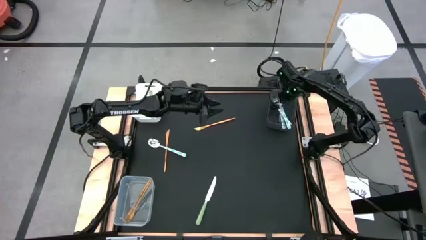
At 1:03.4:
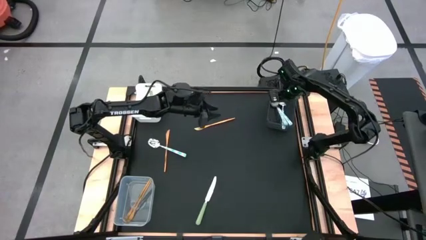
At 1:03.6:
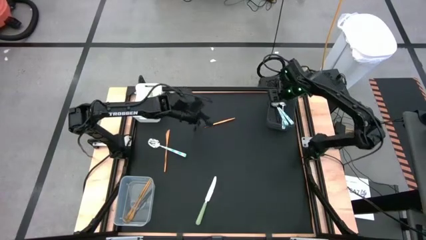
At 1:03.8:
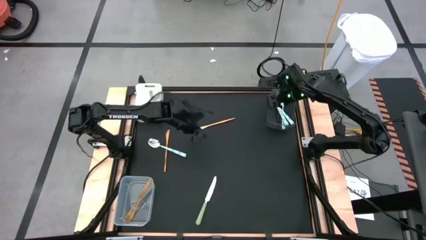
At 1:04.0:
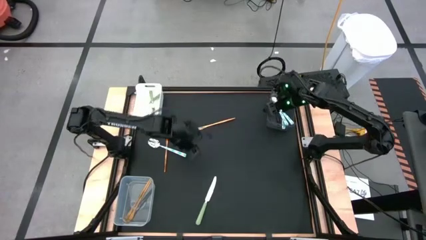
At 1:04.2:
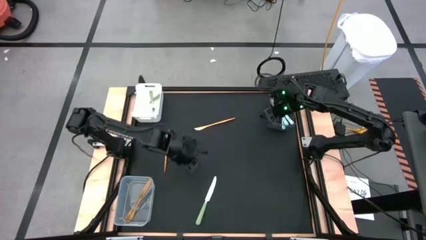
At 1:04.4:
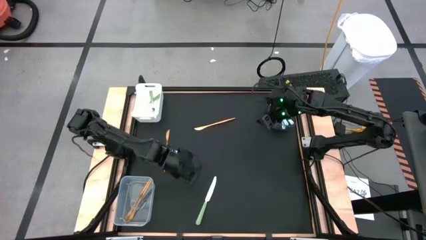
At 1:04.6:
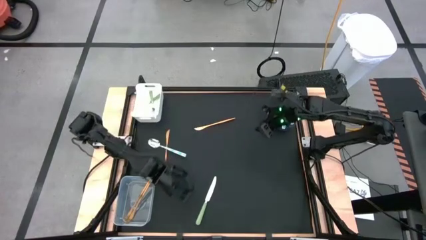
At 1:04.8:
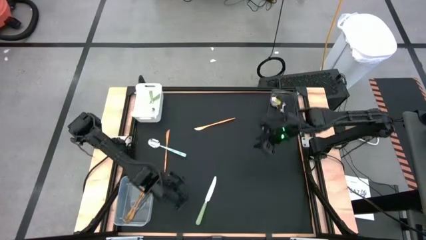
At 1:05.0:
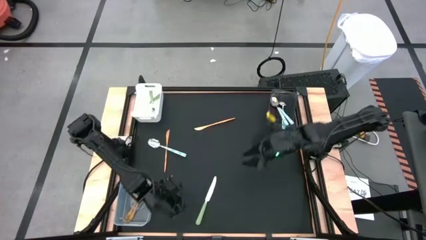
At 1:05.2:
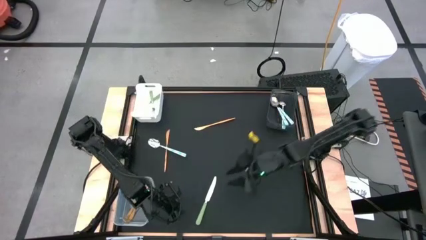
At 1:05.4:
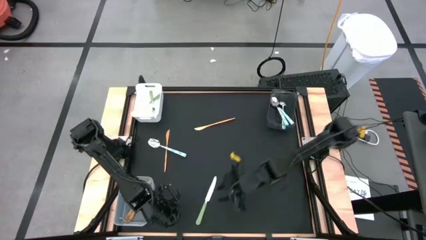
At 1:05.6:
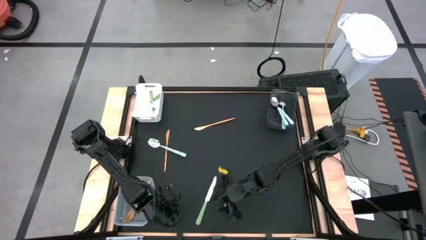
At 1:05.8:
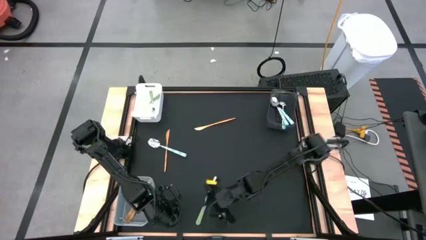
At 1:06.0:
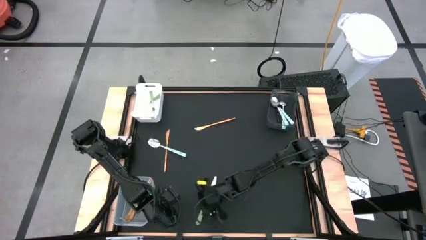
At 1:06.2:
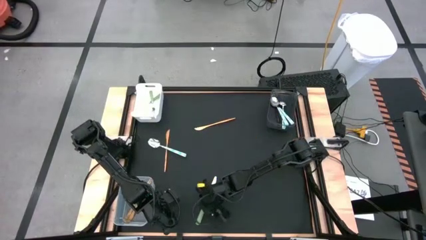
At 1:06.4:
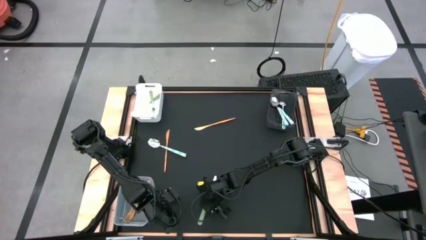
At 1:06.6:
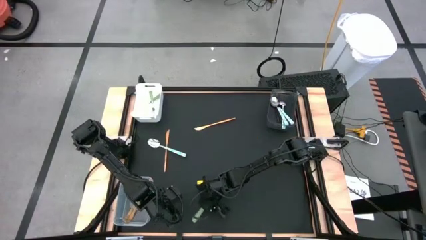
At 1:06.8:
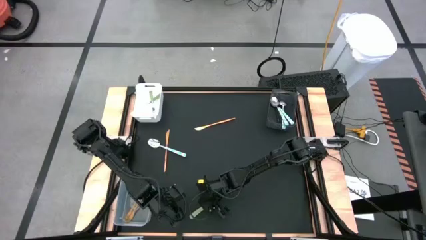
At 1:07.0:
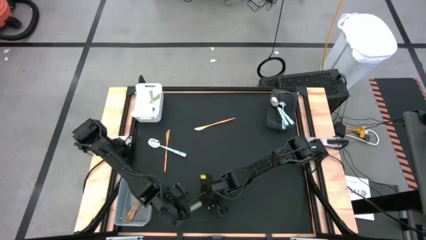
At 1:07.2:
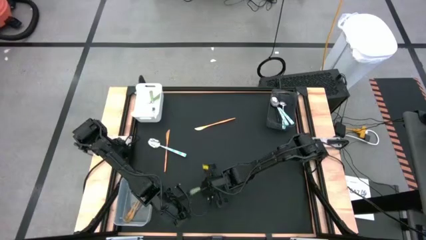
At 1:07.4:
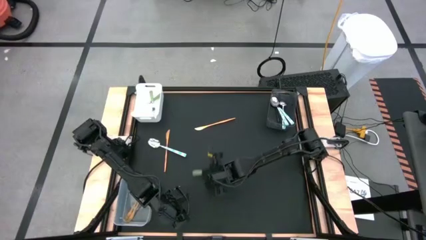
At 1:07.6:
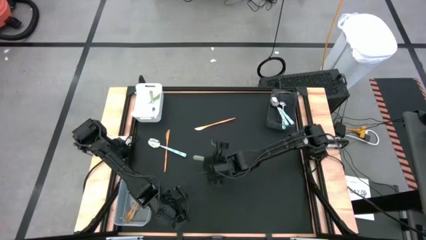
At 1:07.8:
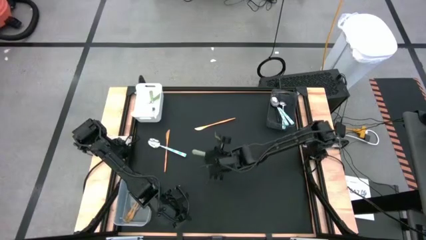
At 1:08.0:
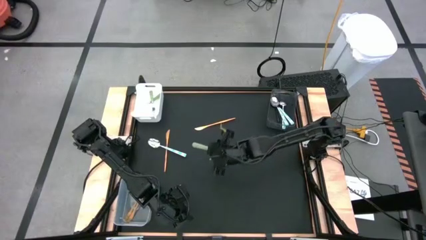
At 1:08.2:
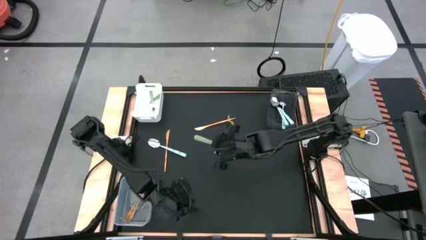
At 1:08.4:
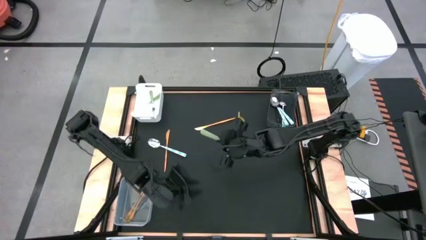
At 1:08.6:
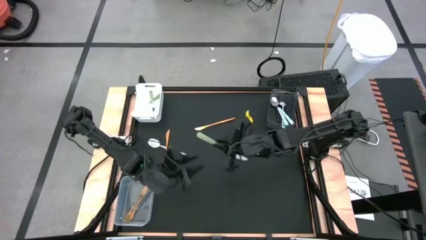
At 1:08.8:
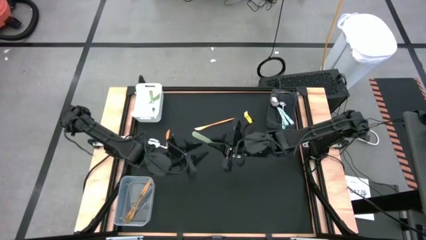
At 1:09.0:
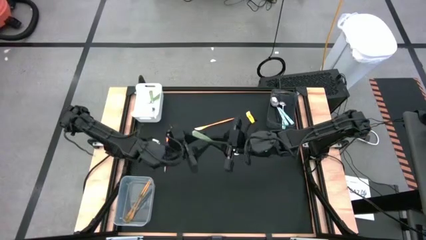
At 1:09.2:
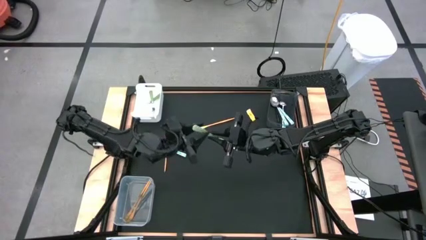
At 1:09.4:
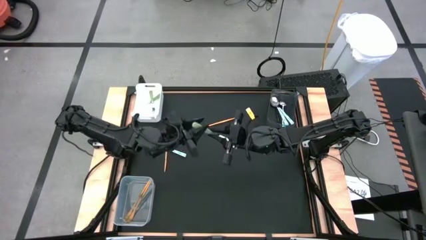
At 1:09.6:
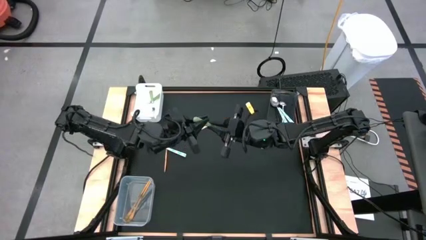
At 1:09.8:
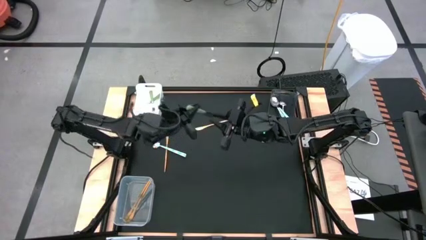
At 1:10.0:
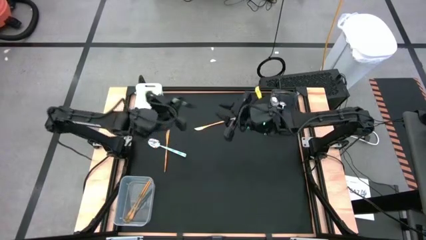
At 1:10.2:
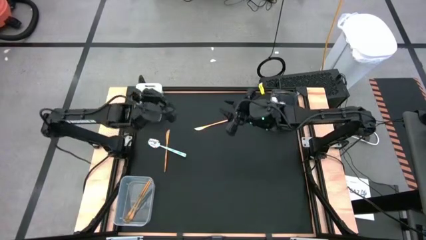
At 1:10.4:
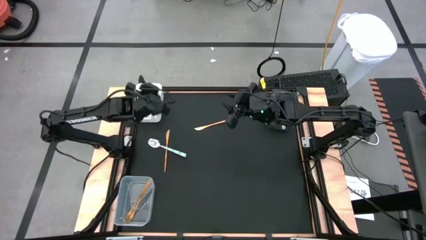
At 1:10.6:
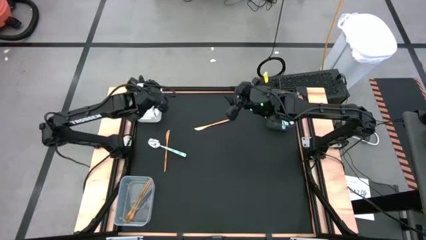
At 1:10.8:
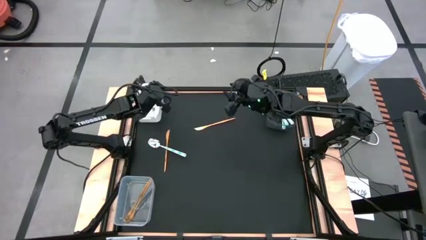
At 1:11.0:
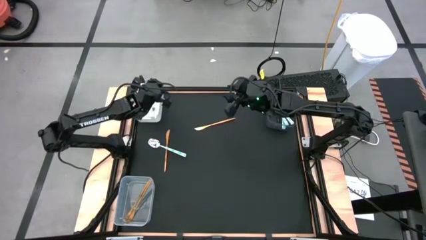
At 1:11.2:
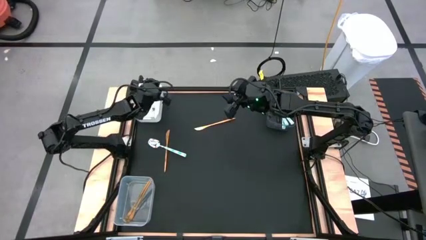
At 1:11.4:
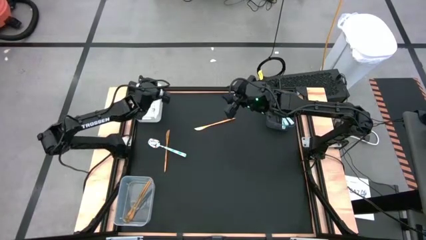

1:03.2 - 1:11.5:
Task: Sort silverware by color (type)
Put the green knife into the white bin

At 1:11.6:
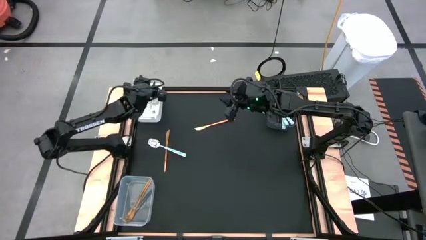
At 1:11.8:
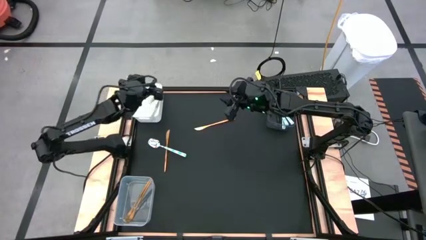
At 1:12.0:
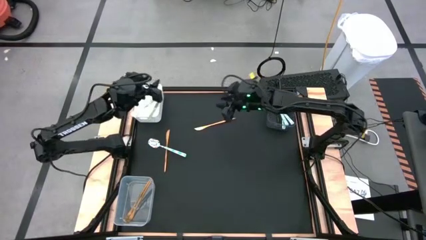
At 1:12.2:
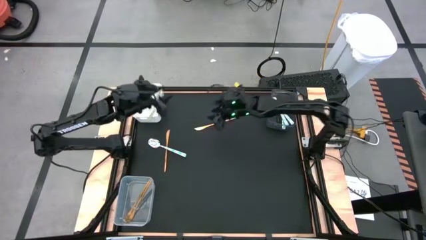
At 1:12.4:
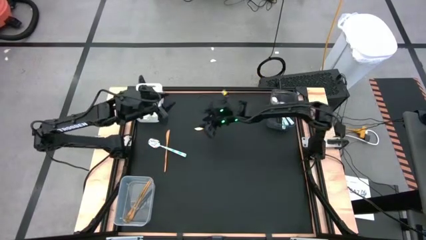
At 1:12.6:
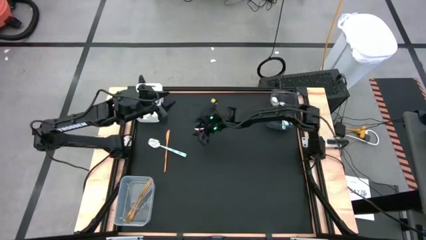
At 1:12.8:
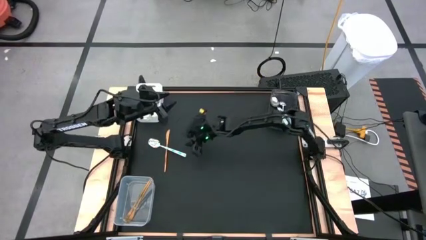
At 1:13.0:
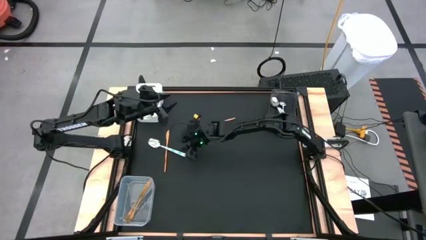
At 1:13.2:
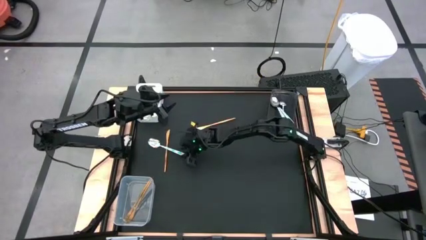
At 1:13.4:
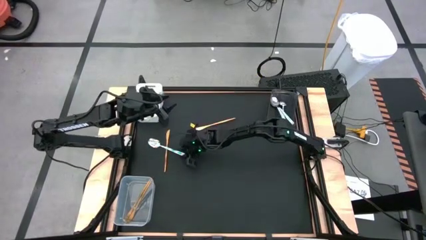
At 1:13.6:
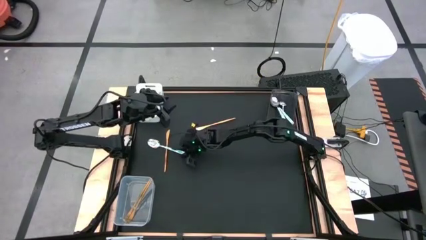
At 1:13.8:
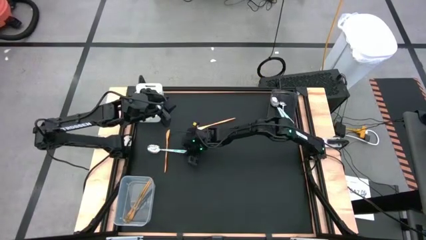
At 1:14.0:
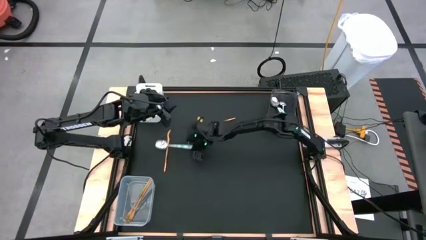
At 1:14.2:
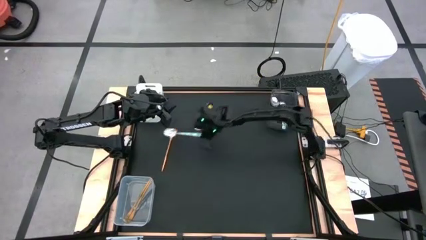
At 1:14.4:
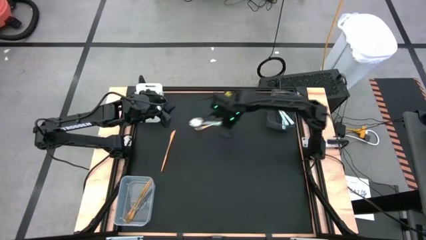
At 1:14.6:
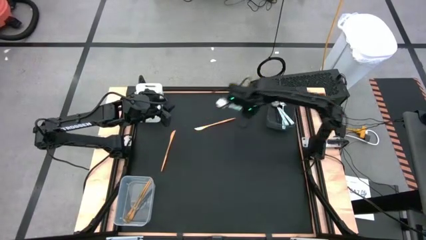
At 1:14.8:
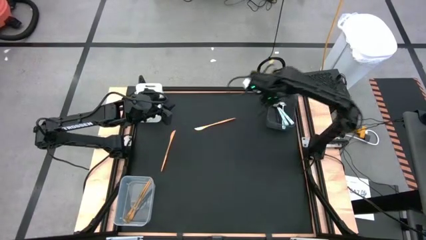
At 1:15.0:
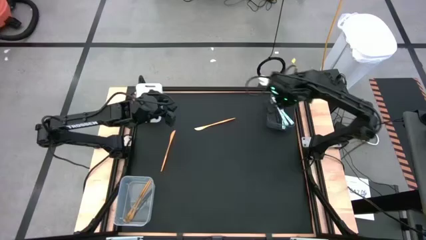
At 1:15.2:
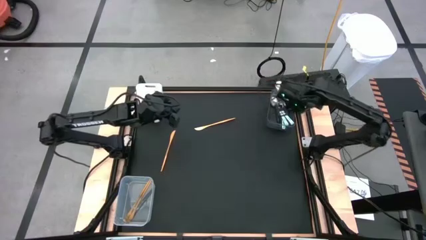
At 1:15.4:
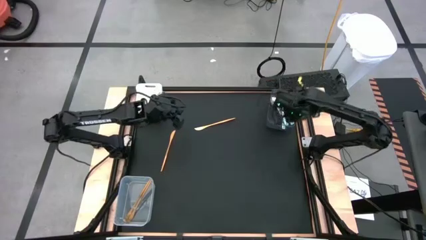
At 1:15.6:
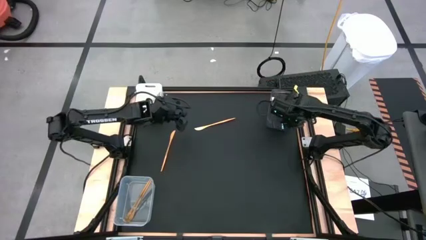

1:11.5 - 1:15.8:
Put the blue spoon into the black bin

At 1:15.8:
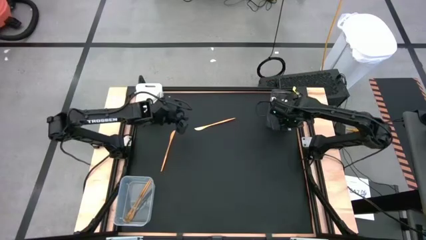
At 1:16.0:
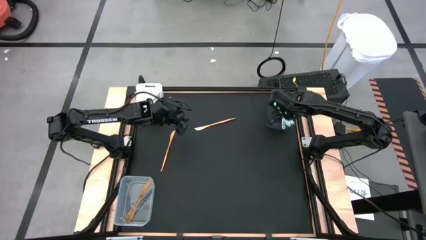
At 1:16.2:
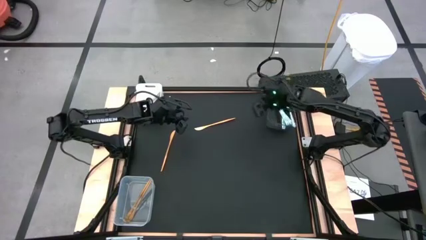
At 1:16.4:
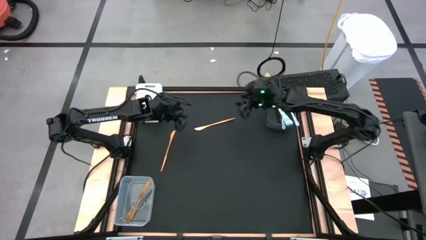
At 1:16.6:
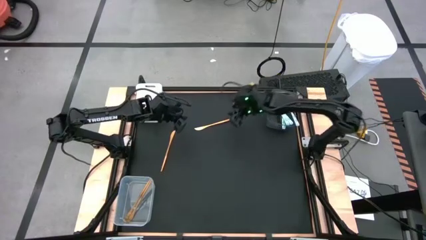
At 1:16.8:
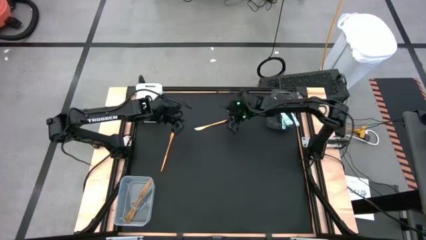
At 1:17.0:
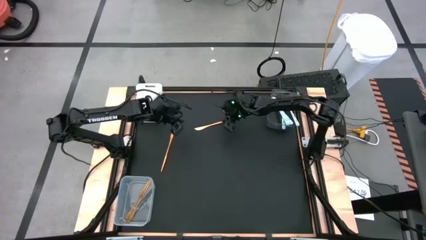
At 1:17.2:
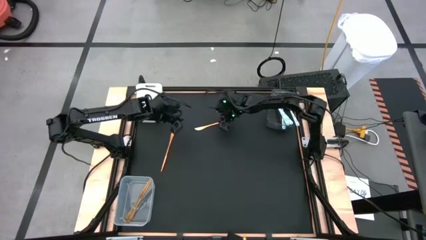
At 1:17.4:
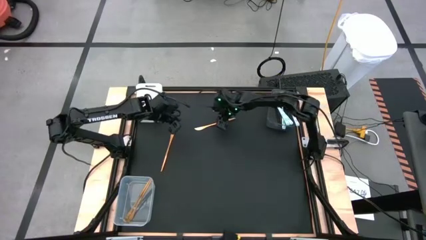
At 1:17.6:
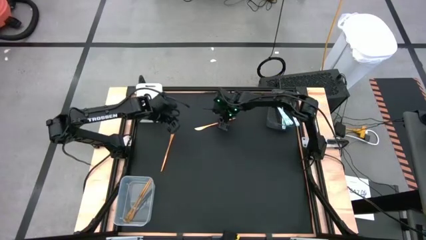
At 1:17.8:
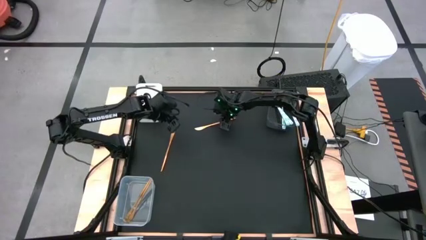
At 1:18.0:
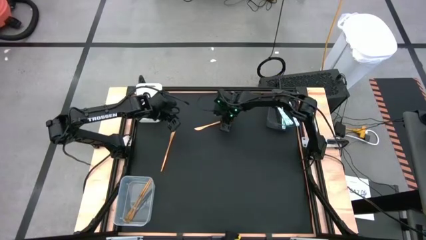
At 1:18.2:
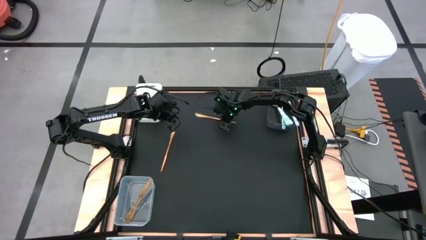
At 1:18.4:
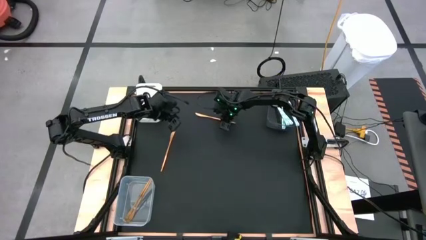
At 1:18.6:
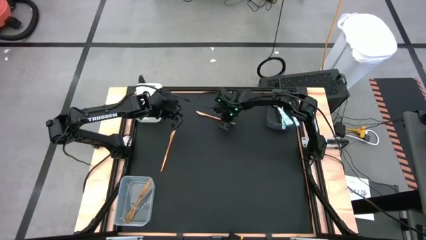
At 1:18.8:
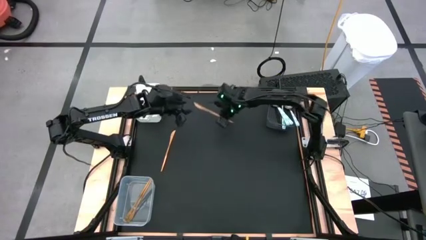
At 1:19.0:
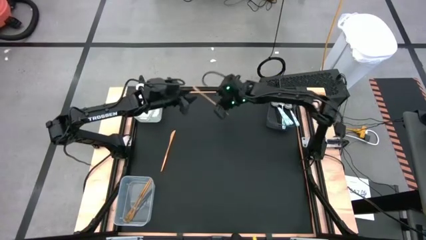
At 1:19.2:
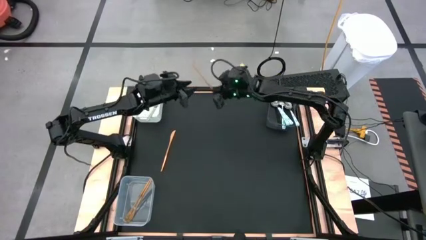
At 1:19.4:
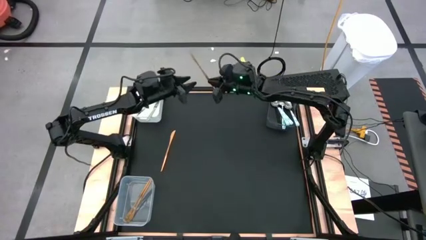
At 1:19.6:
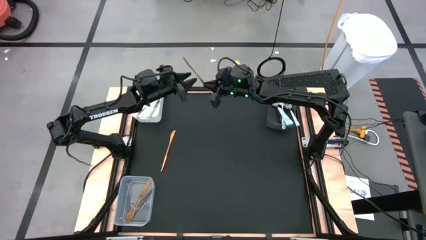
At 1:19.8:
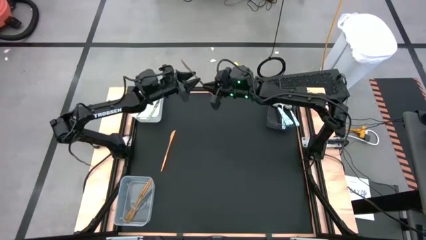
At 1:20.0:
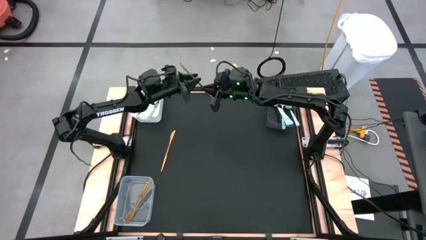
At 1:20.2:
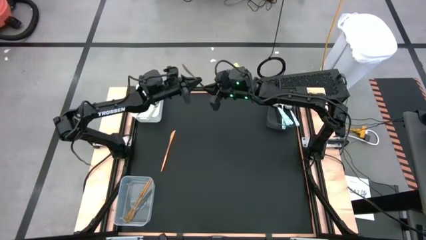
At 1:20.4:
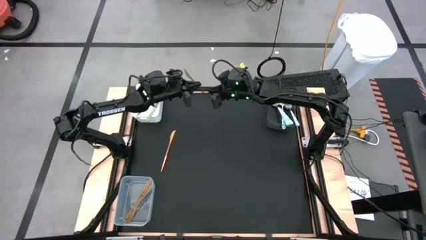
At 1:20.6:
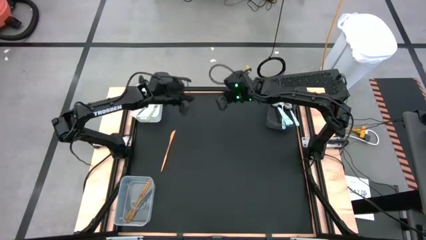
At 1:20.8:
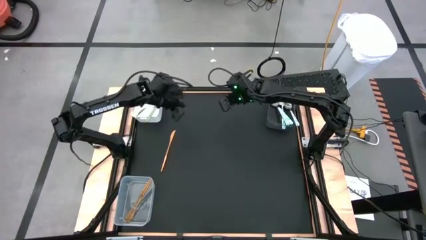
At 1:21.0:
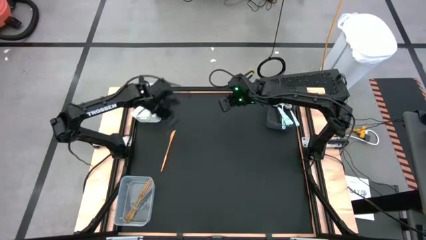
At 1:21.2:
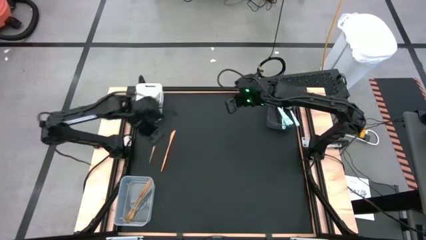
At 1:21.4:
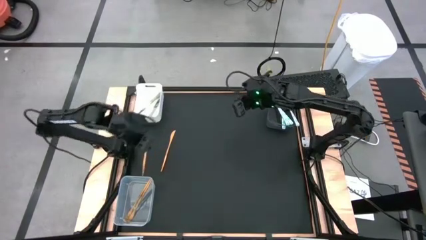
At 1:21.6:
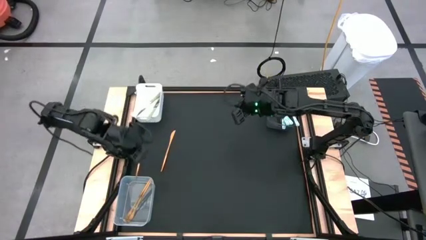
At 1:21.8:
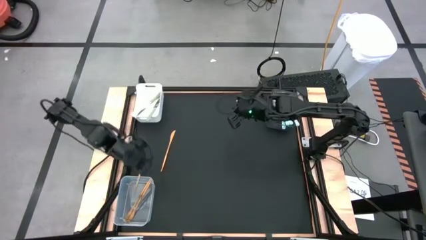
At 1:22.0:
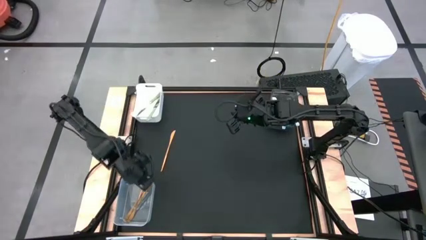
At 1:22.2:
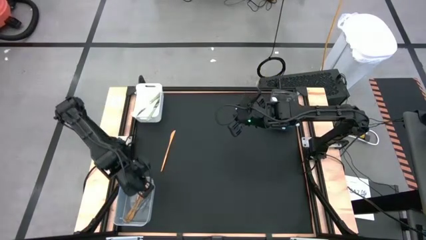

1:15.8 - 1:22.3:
Put the gold knife into the transparent bin
